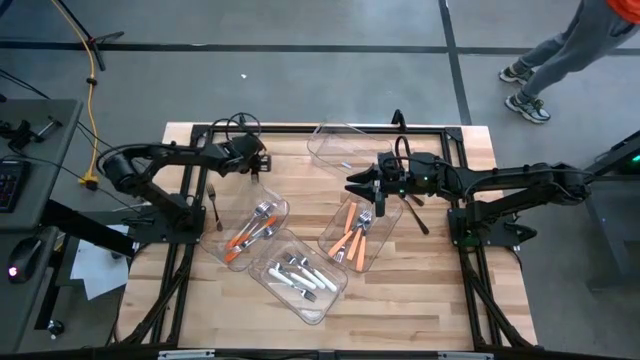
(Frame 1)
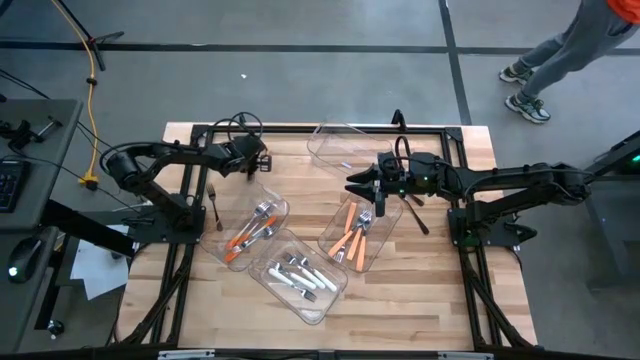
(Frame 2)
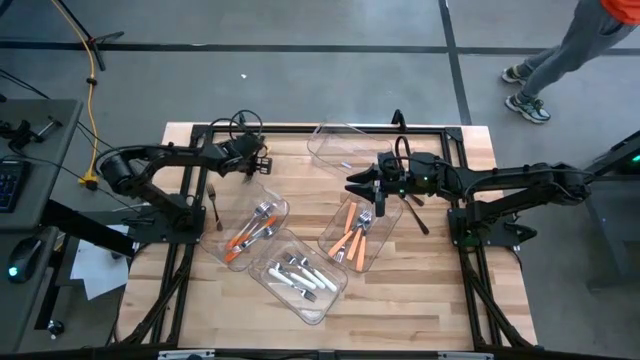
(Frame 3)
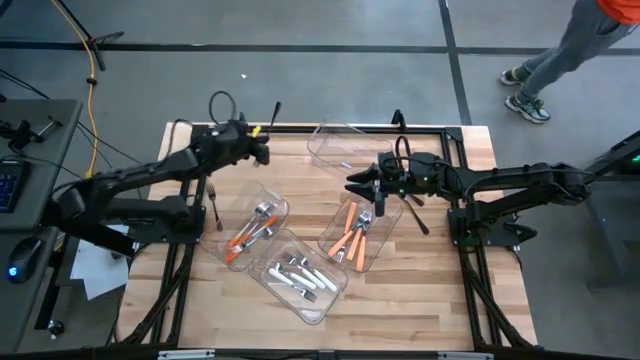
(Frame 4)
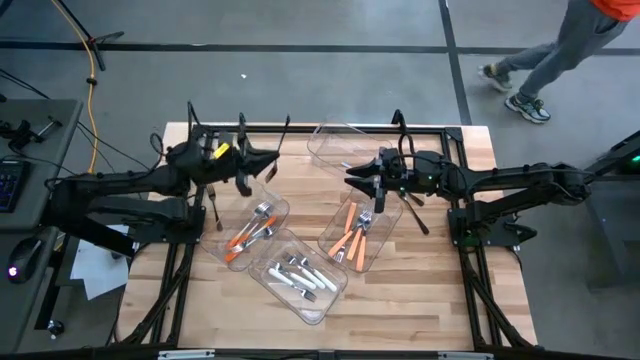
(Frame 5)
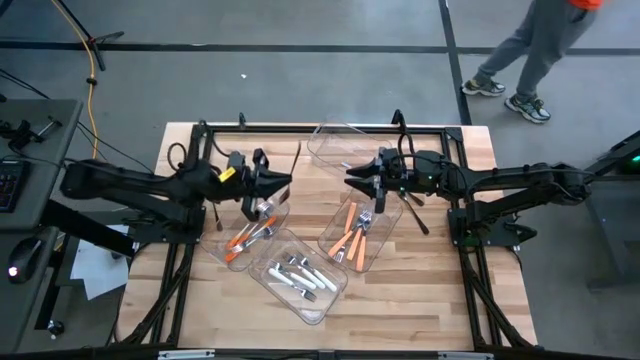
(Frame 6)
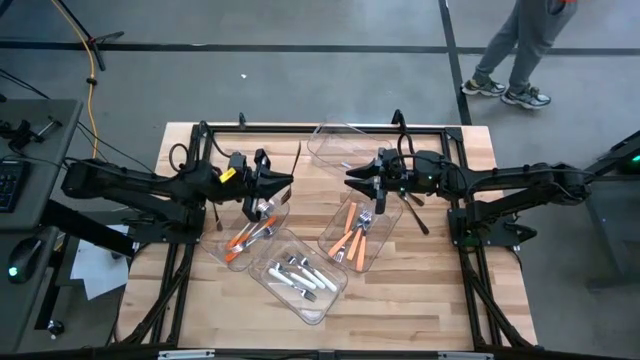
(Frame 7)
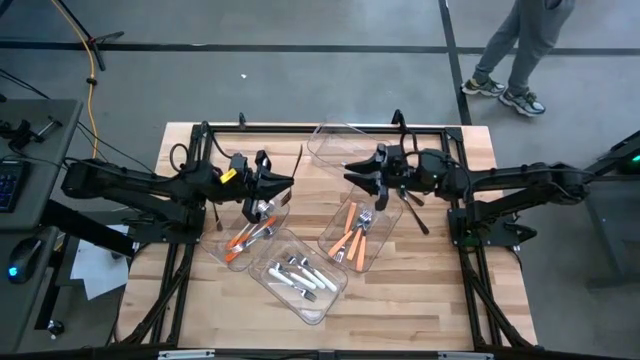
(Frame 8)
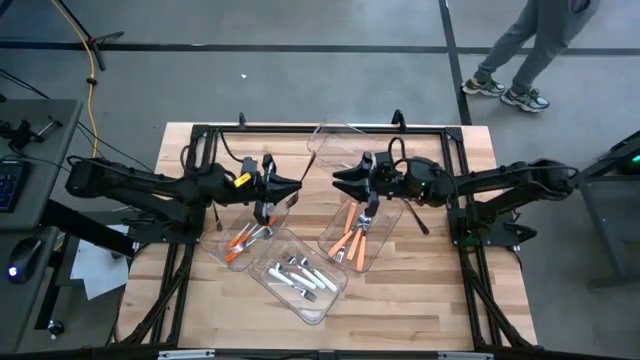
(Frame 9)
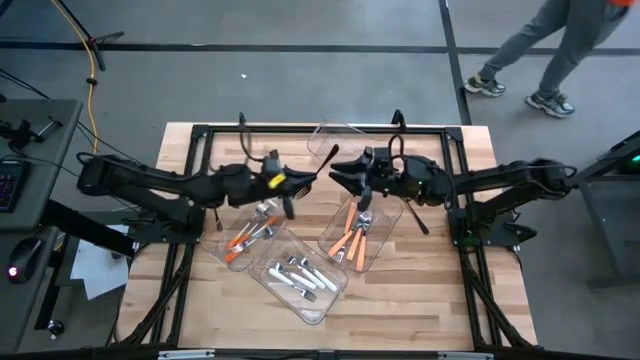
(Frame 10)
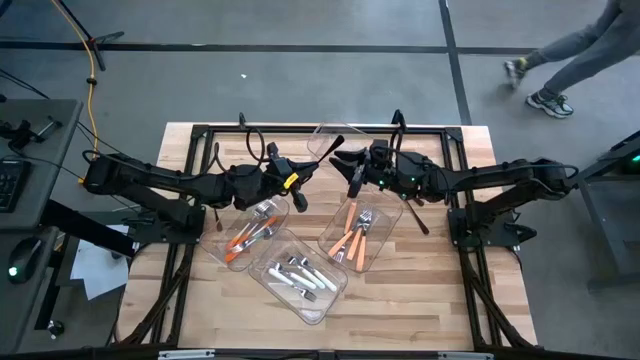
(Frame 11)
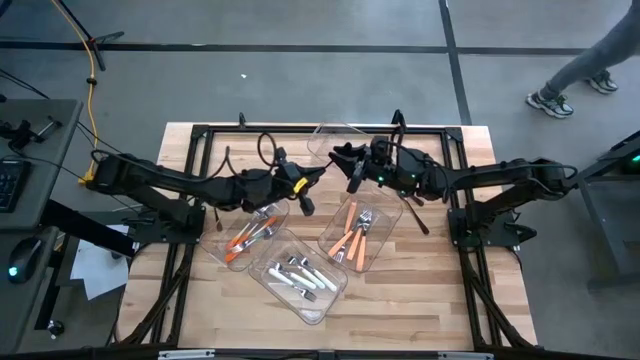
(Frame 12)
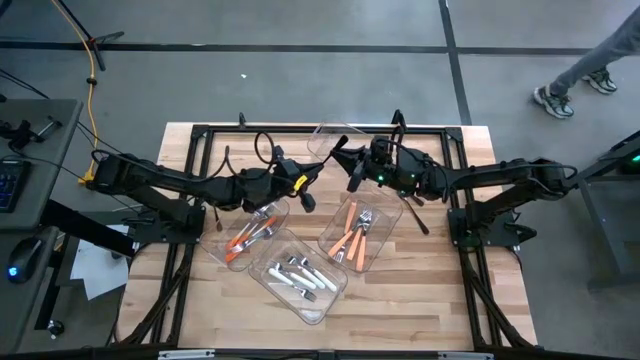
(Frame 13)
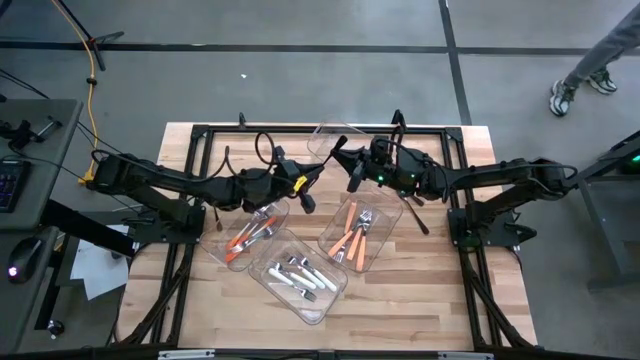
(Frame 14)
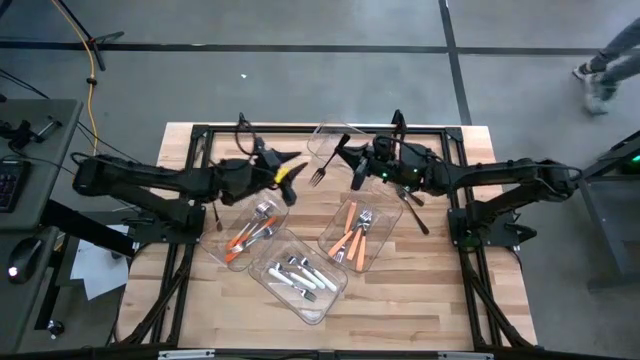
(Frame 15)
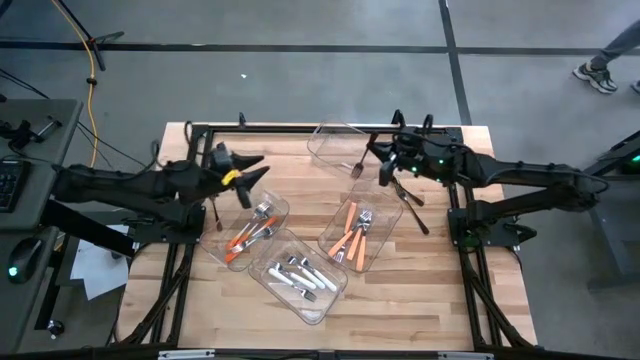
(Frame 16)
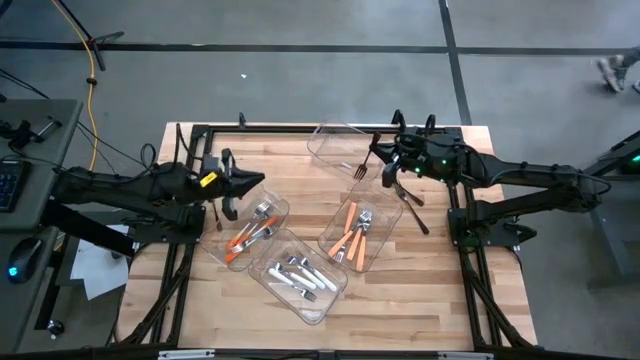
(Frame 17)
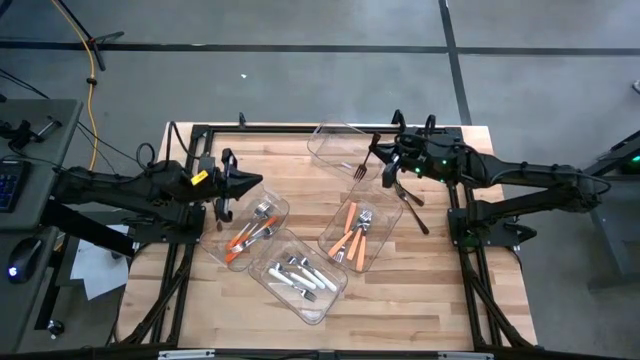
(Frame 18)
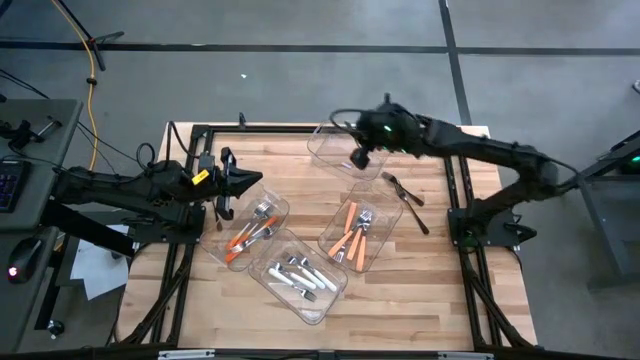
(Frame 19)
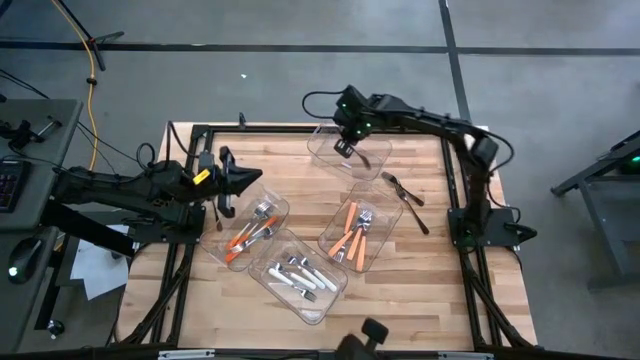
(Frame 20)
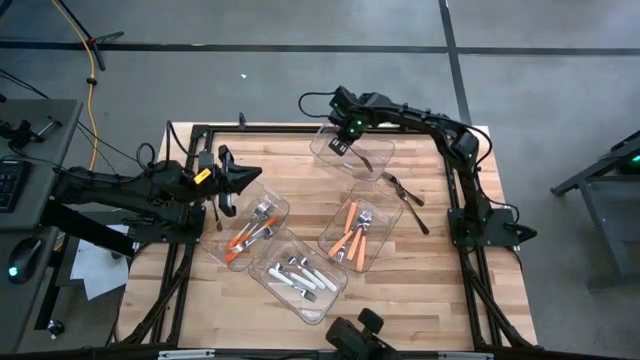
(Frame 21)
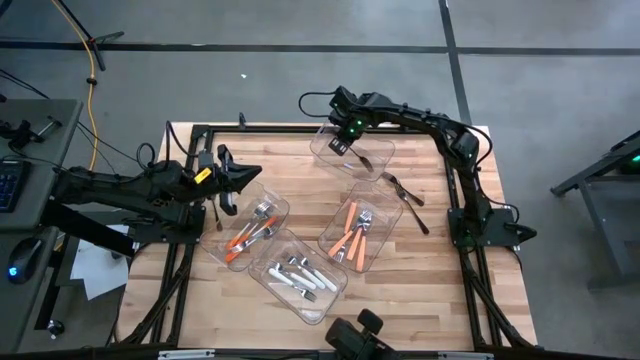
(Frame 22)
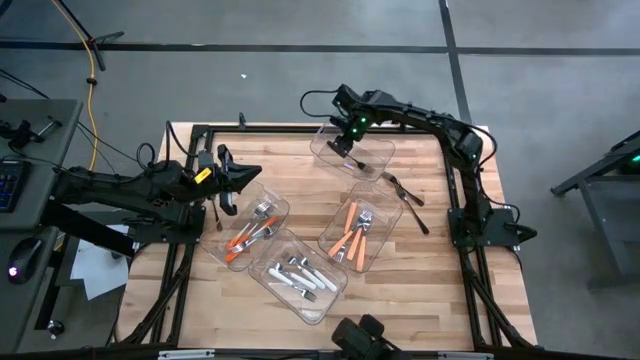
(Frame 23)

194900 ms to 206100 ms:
Task: Sort silverware by color (type)
Put the black fork into the top transparent bin

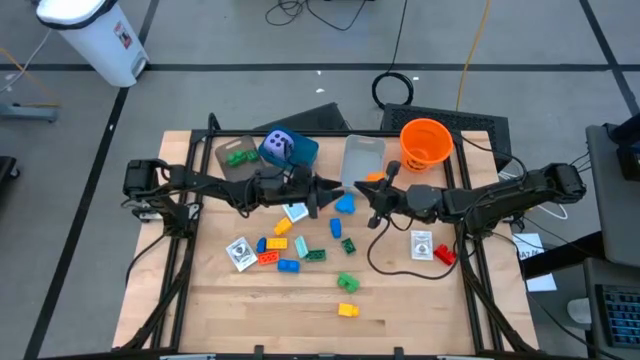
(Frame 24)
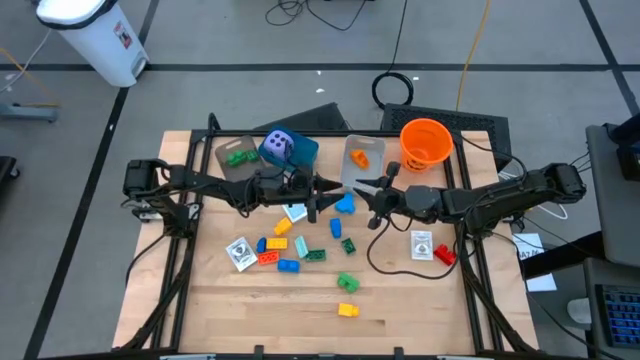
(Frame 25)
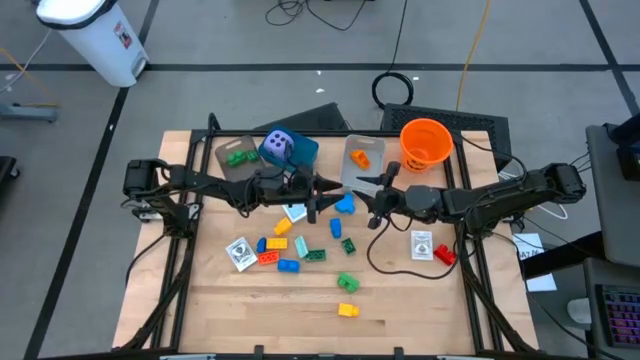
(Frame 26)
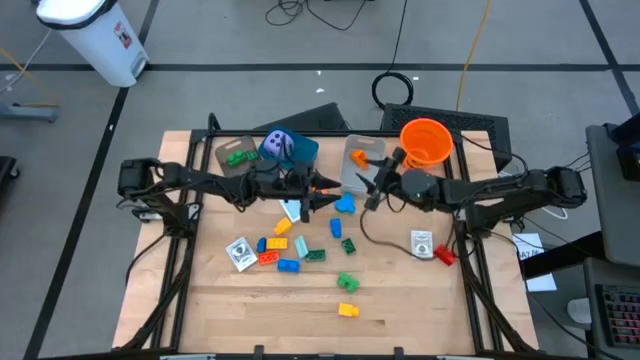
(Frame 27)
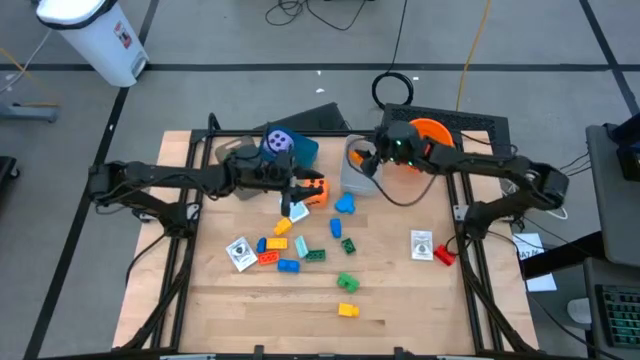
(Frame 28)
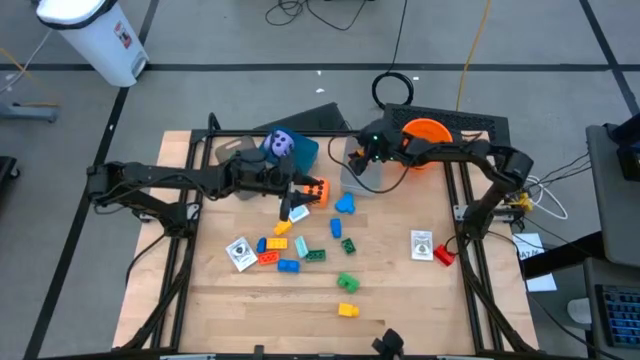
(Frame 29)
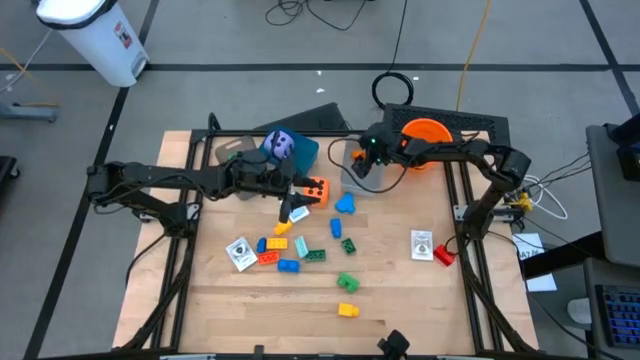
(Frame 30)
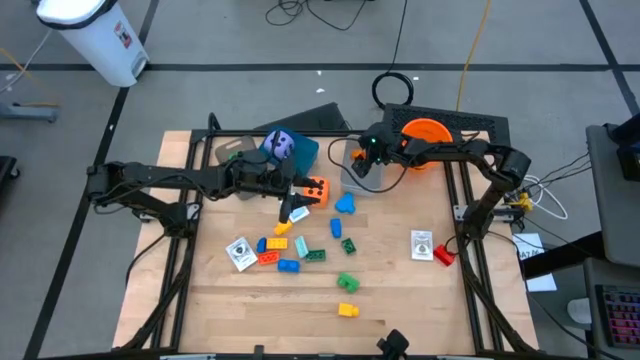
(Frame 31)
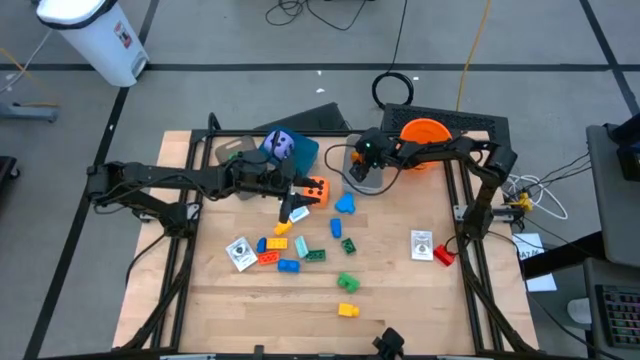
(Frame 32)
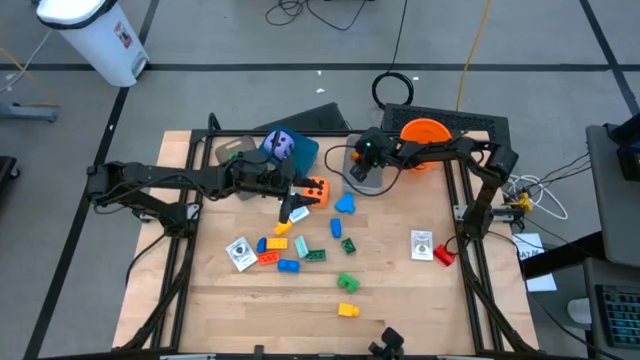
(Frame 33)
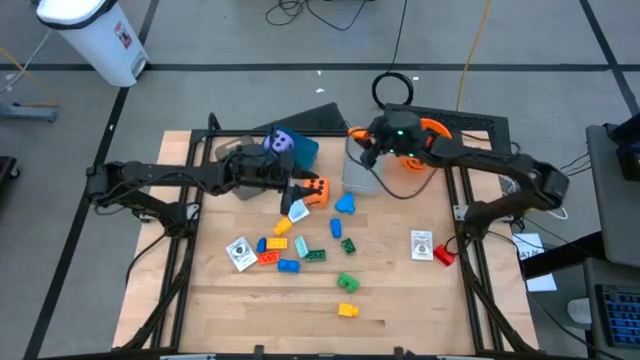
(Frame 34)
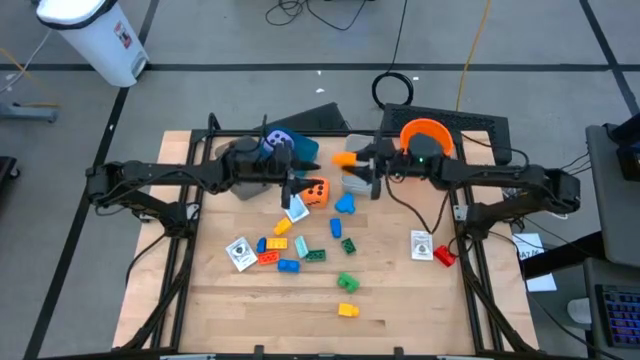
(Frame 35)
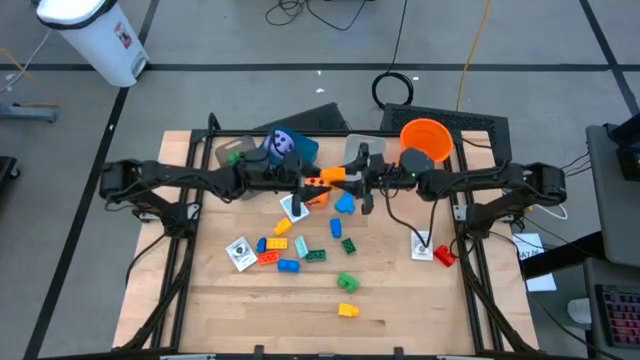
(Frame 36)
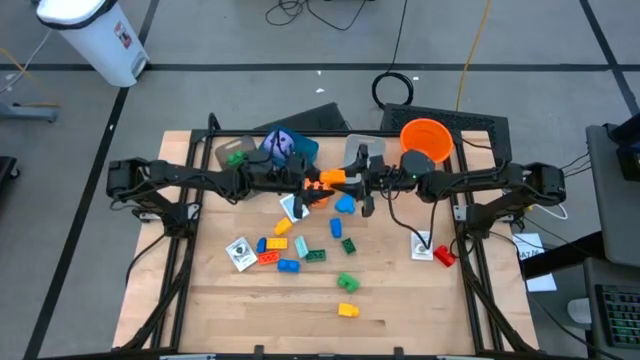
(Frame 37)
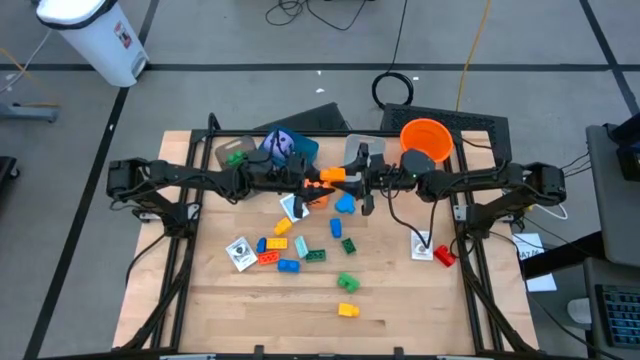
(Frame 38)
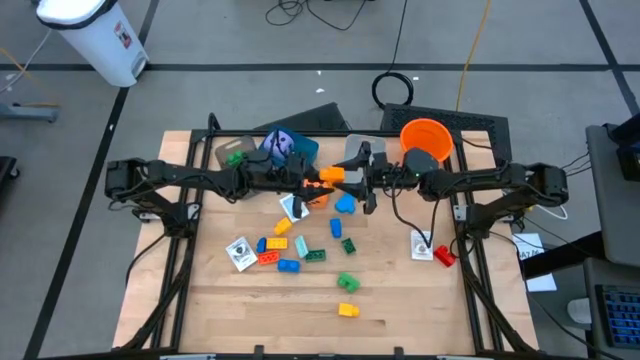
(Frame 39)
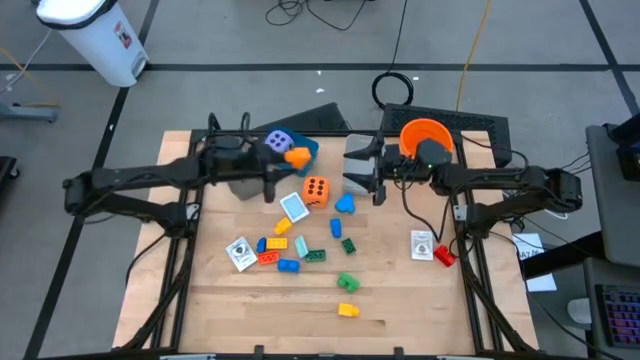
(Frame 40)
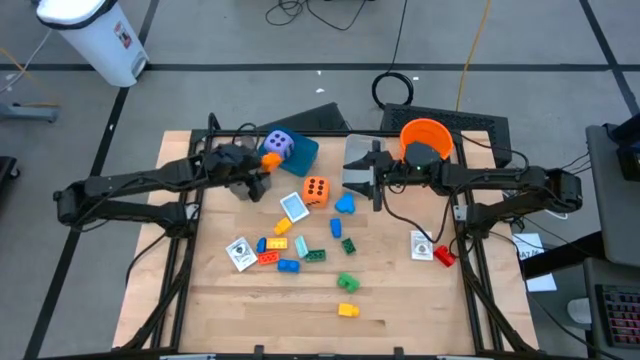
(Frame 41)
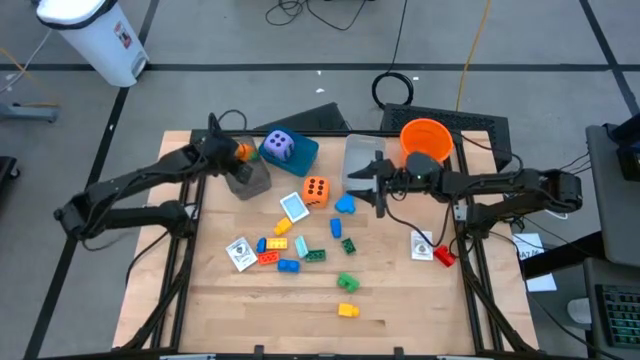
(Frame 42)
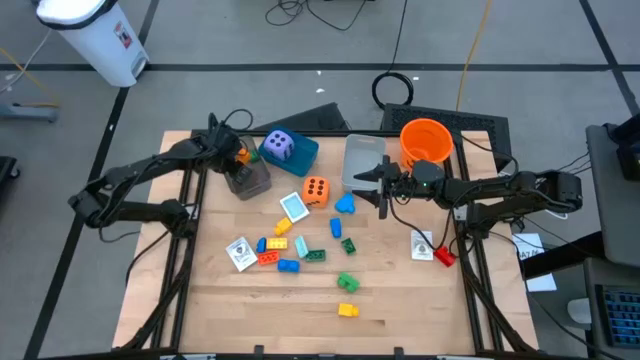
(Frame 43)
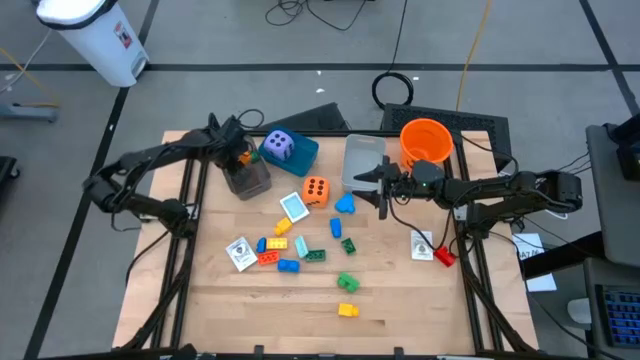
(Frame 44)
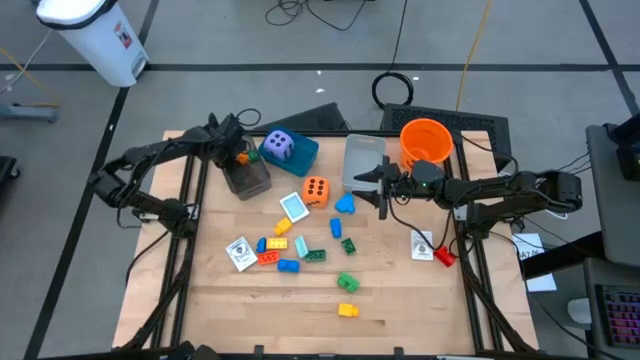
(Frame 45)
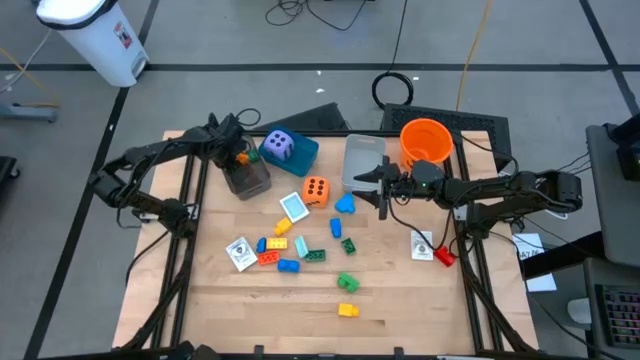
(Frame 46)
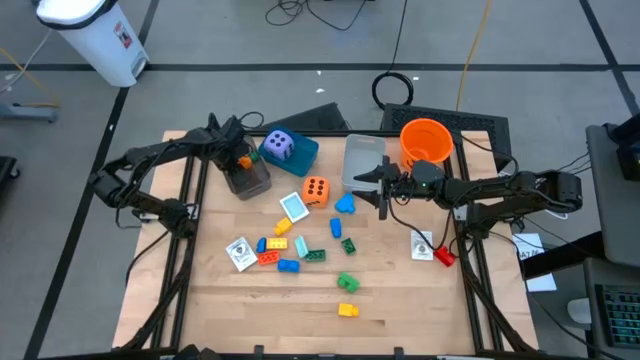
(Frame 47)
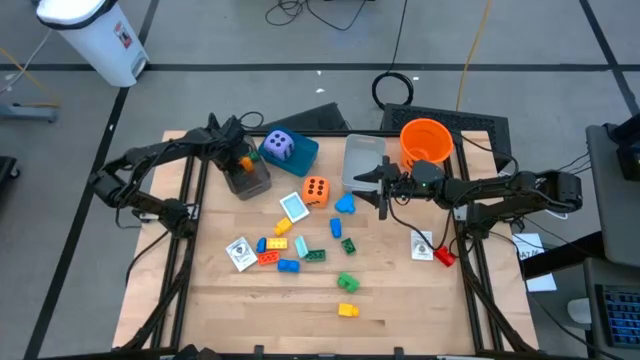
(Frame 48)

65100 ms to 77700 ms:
Task: Pick & Place Toys
Put the orange game piece into the black bin
